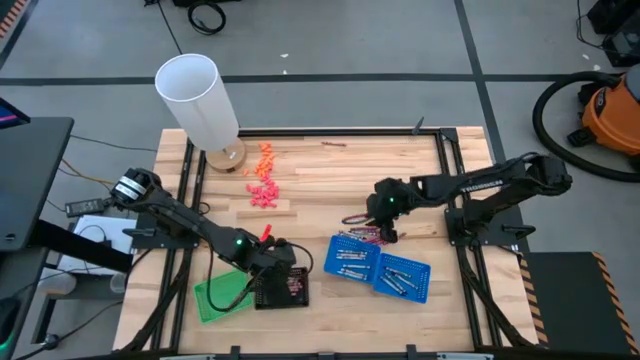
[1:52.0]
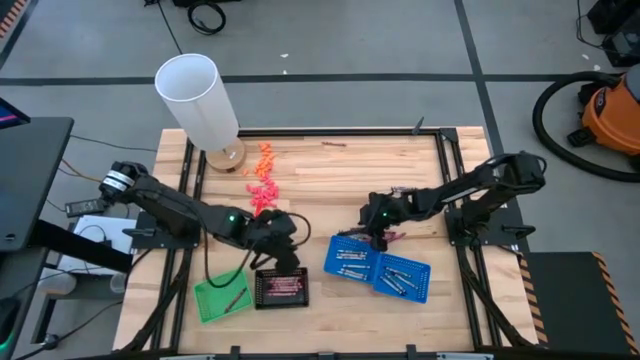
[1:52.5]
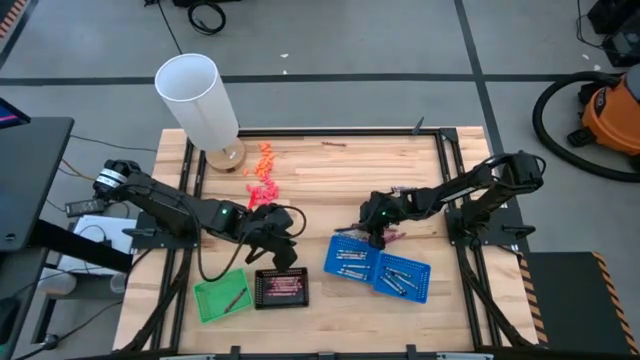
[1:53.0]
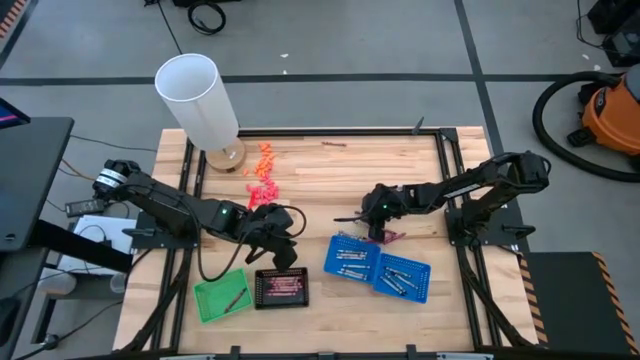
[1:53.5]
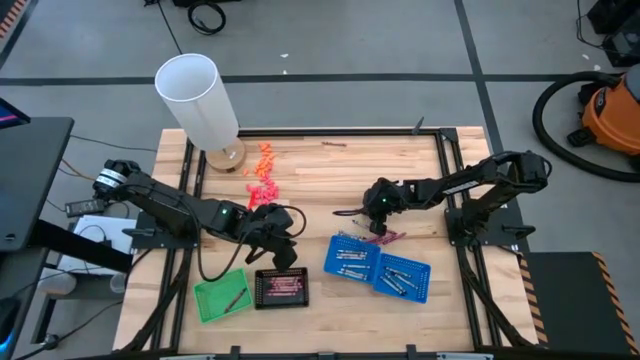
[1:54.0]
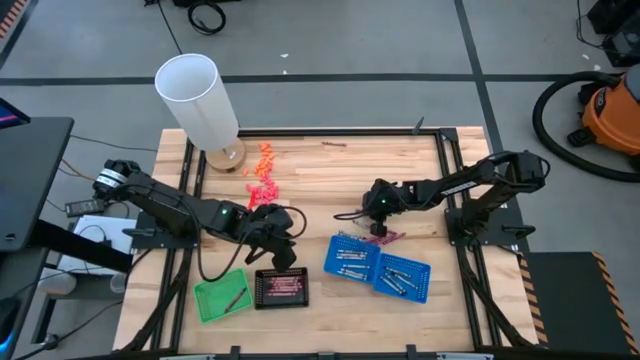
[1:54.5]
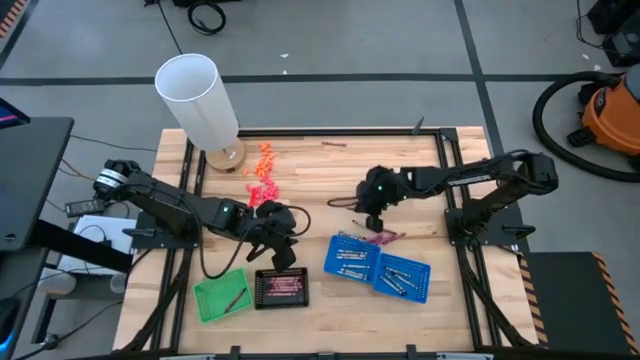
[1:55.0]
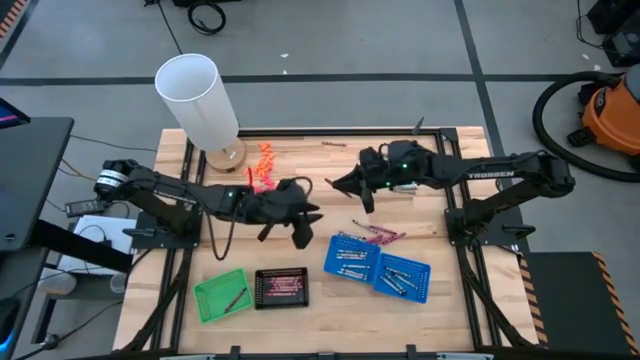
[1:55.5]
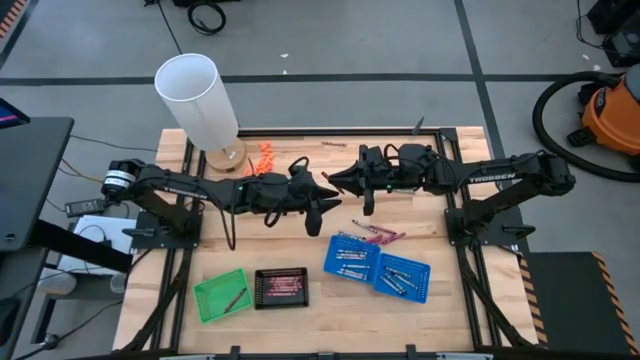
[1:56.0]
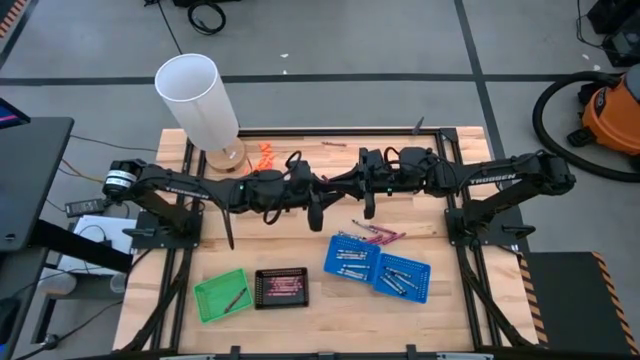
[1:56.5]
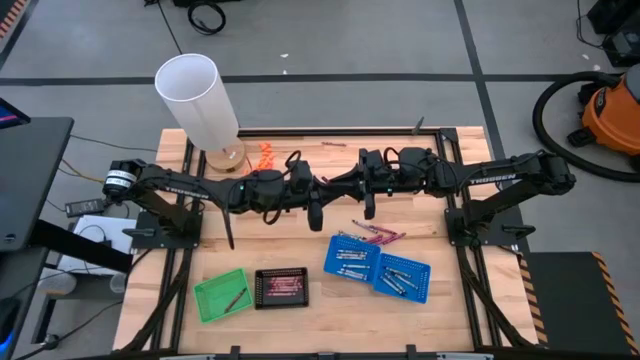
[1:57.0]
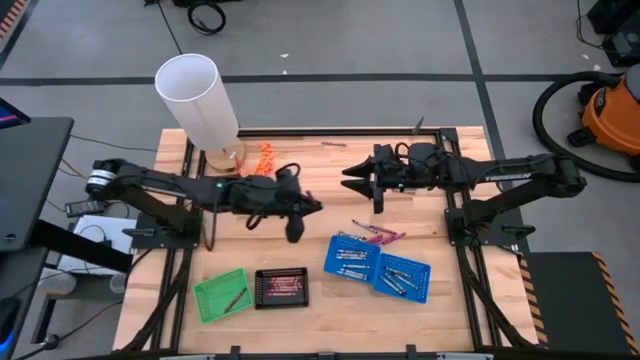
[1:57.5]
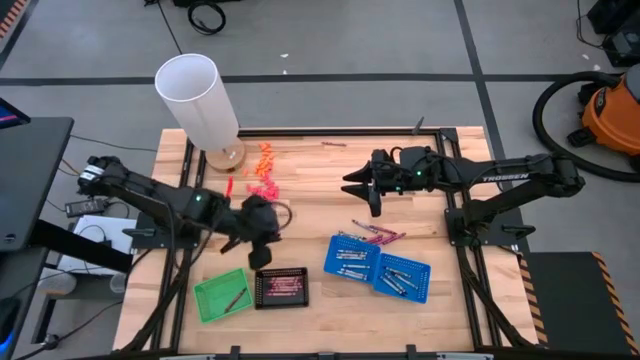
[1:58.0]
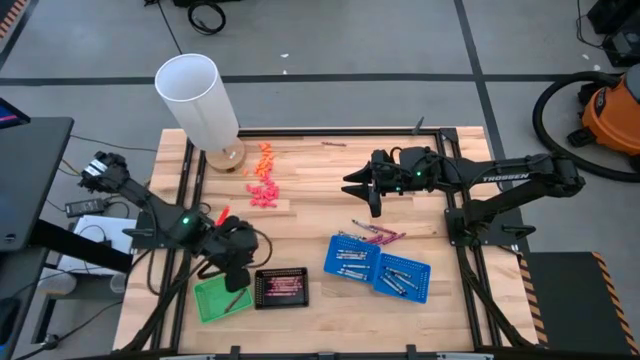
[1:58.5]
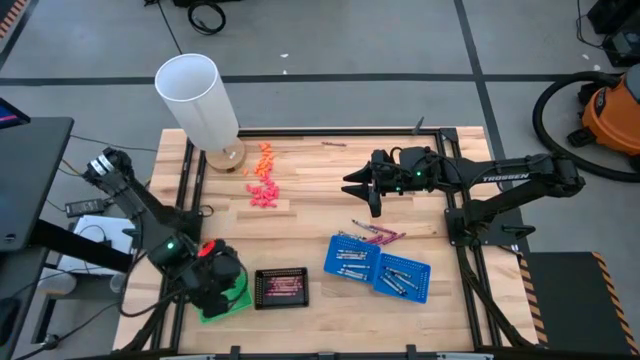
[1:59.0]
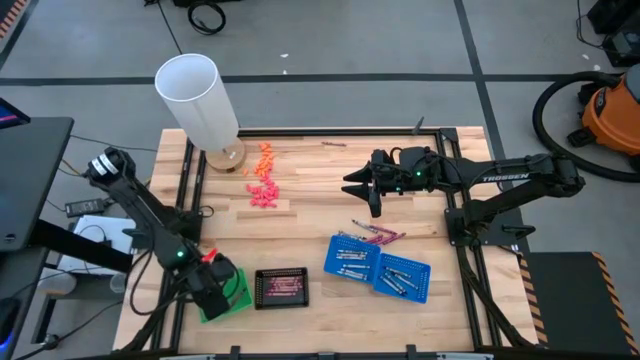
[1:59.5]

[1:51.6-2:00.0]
Task: Sort crayons
Put the red crayon into the green bin

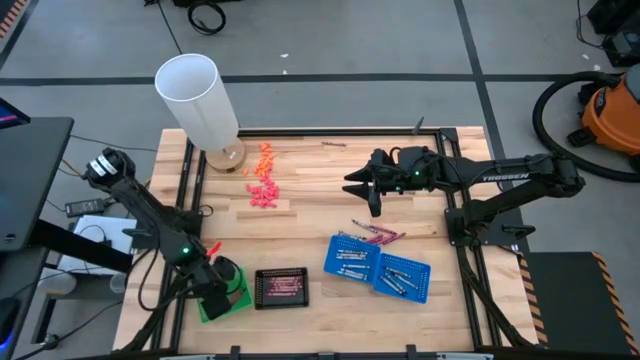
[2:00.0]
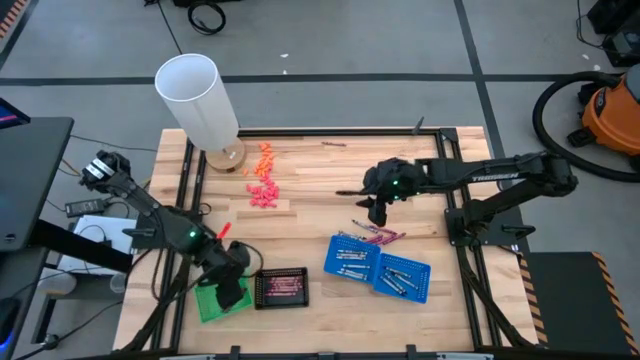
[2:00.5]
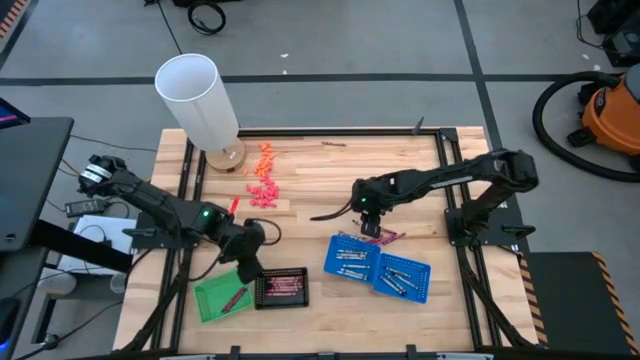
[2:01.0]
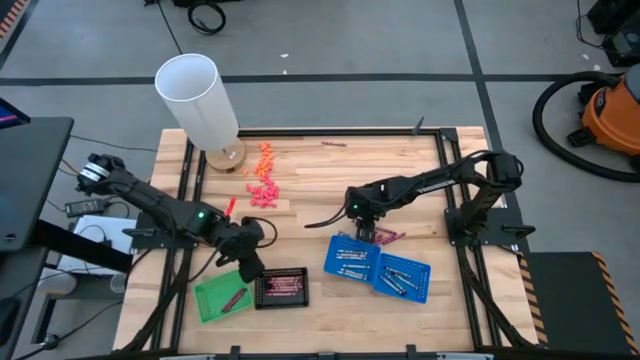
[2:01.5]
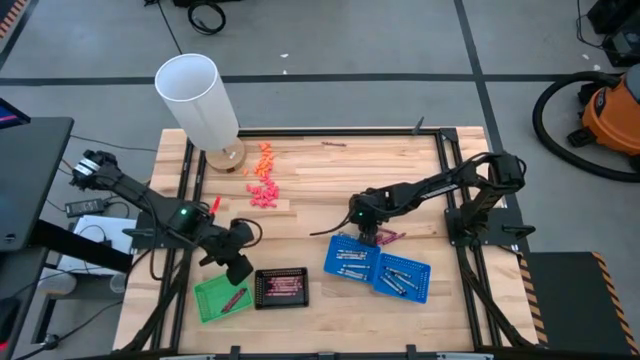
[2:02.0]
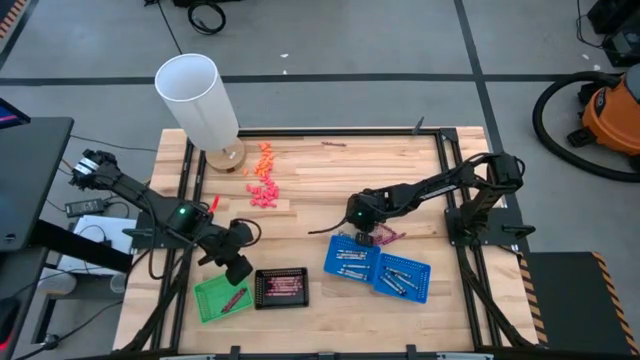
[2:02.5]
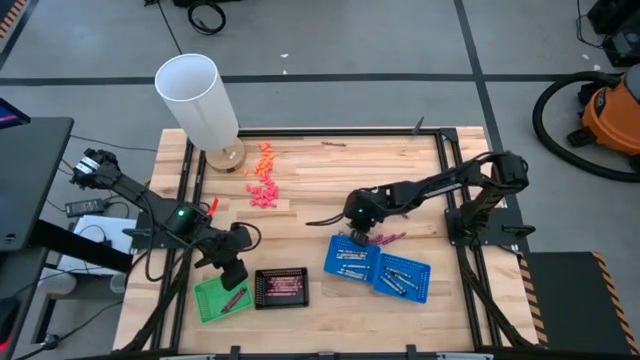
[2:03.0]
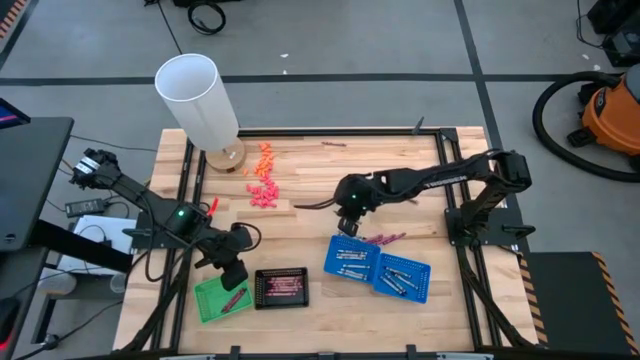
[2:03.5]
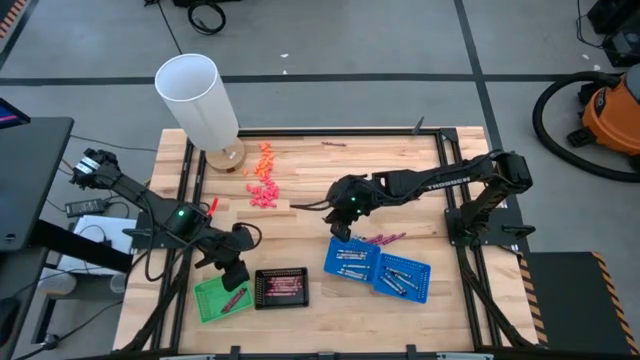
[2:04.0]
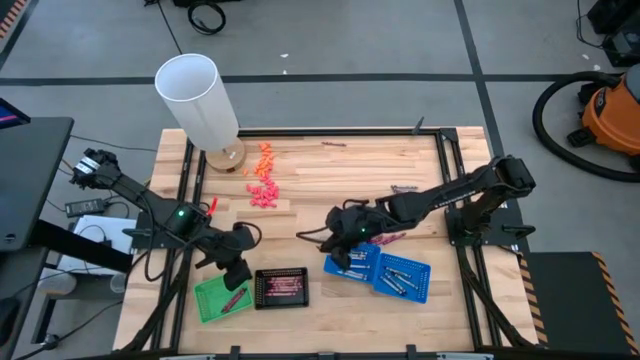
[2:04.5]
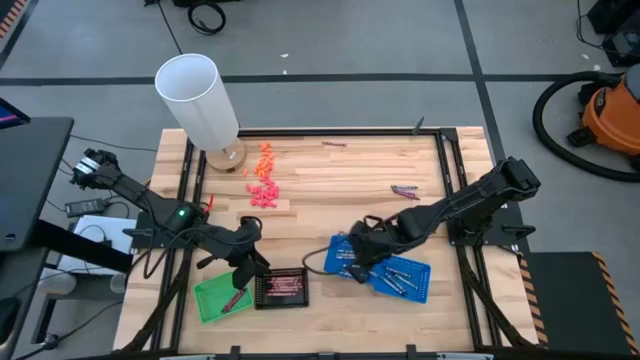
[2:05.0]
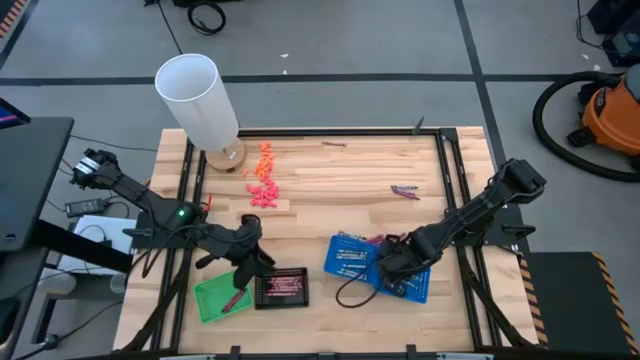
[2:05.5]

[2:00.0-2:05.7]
Put the black crayon into the right blue bin

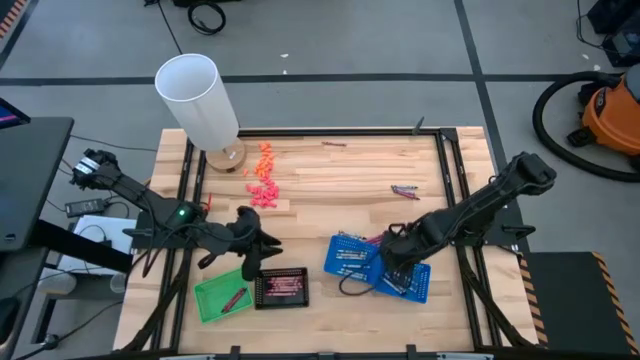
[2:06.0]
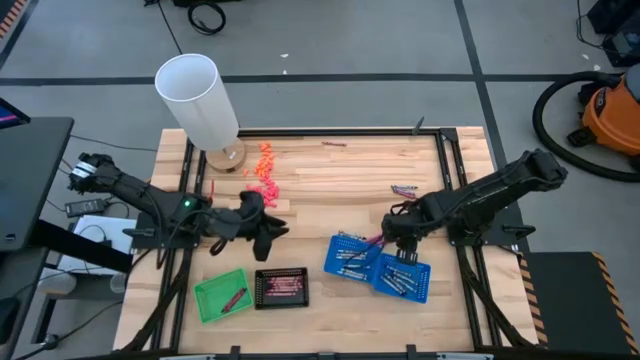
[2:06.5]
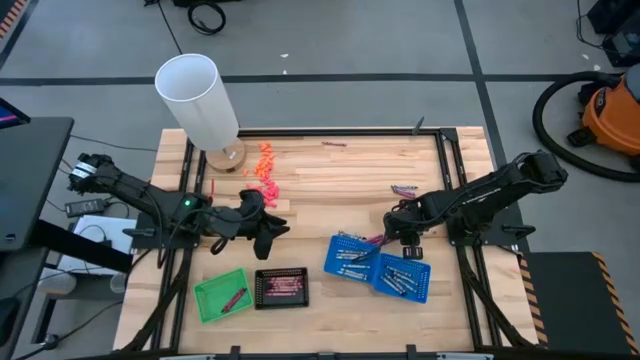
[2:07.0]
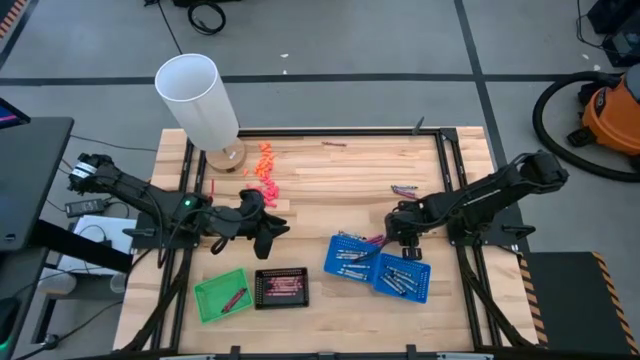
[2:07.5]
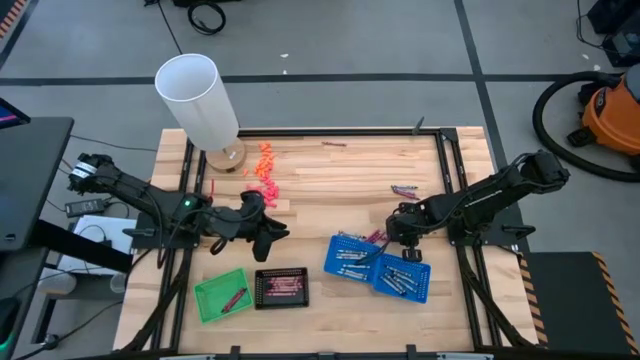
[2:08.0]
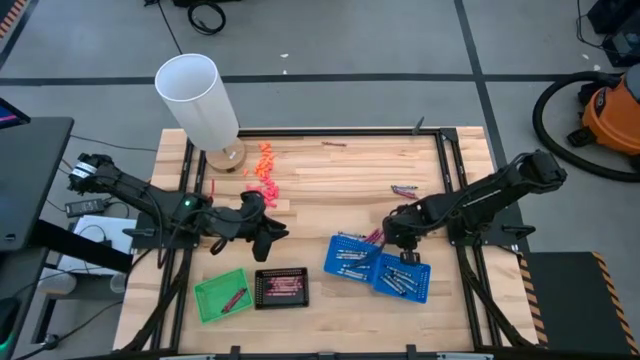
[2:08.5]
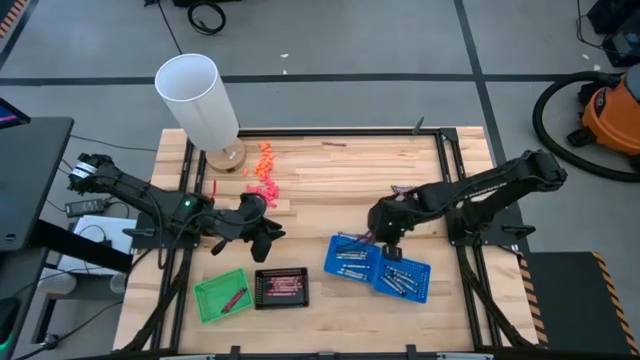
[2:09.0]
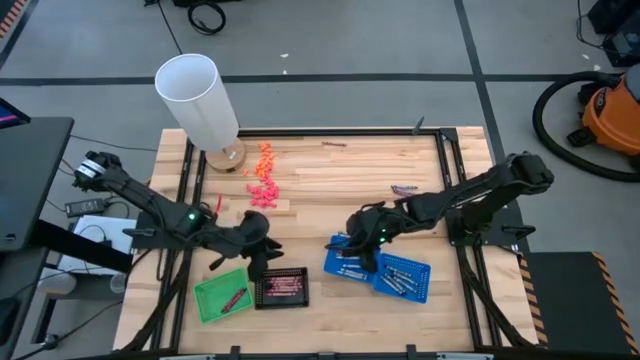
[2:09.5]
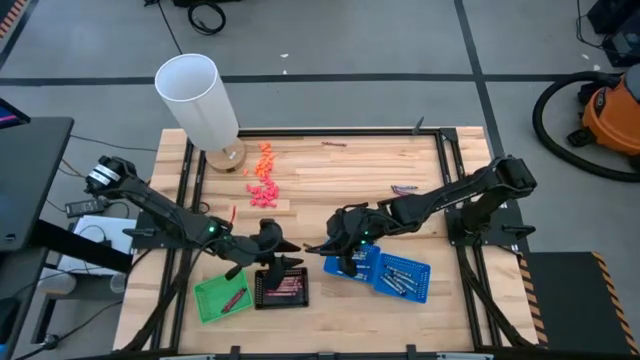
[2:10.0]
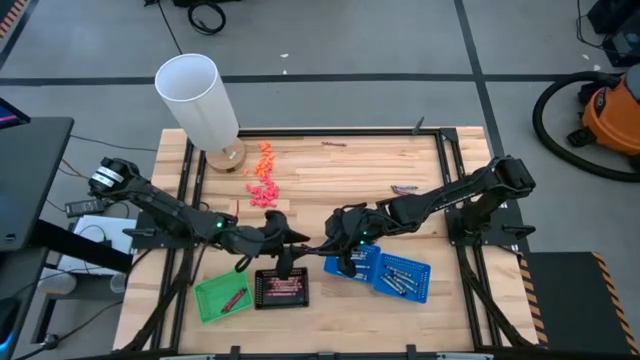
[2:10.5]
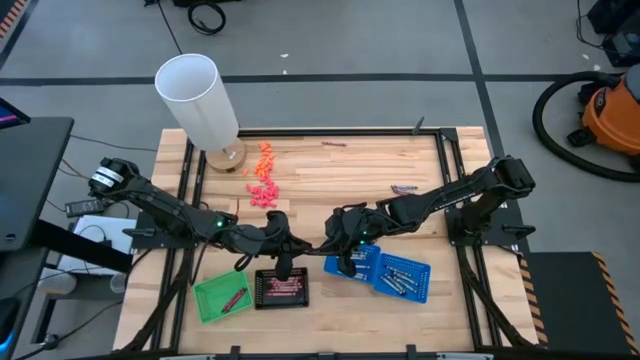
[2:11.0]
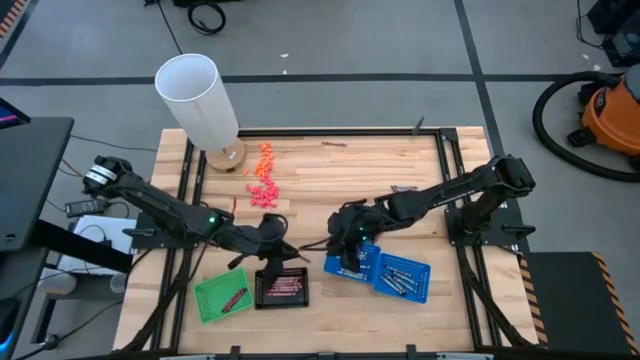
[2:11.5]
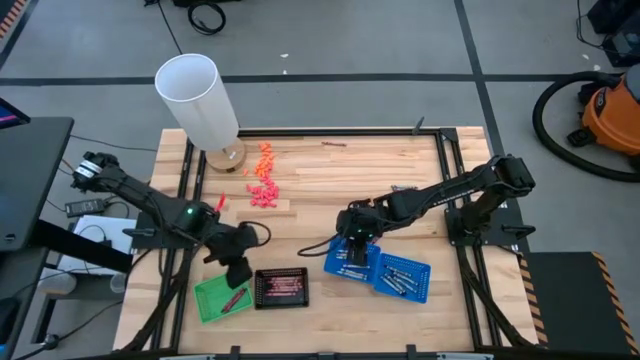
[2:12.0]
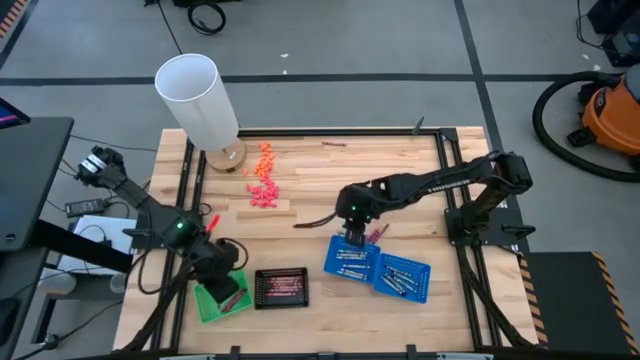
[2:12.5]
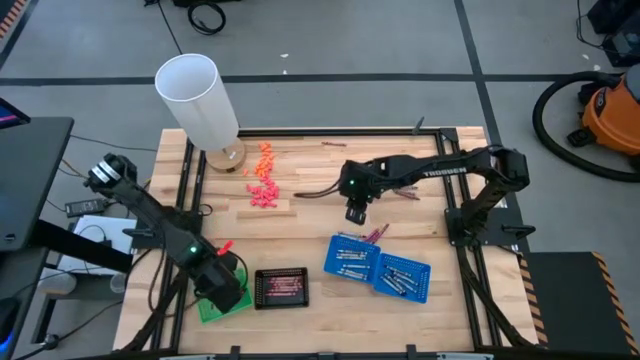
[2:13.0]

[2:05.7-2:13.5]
Put the red crayon into the green bin
